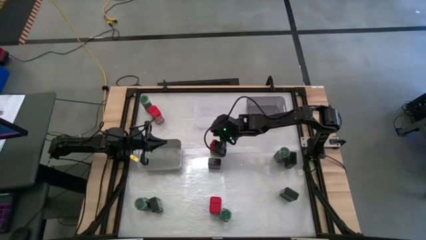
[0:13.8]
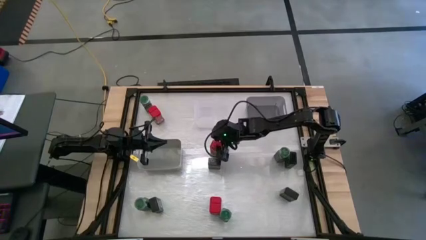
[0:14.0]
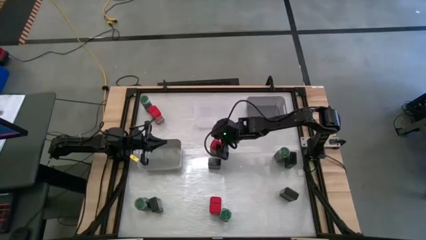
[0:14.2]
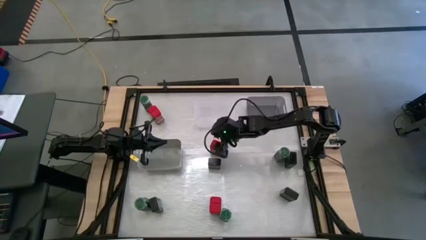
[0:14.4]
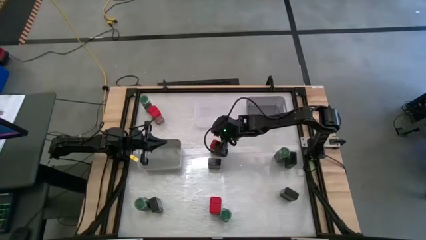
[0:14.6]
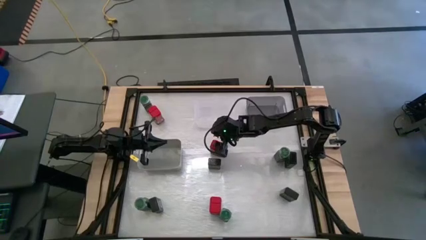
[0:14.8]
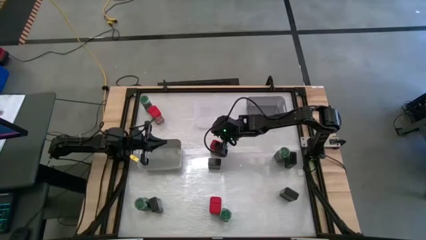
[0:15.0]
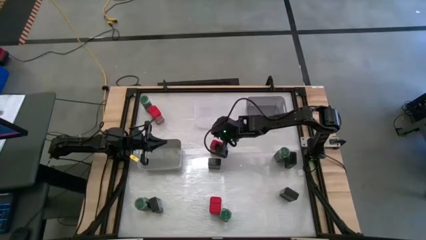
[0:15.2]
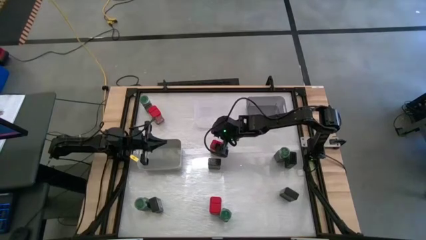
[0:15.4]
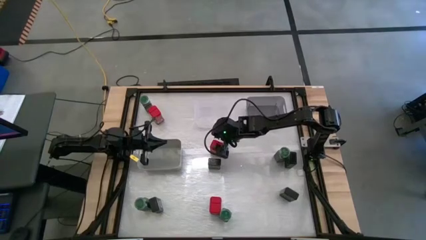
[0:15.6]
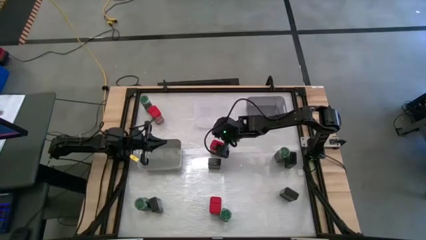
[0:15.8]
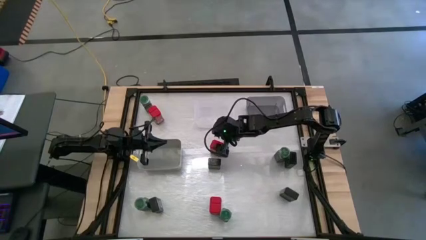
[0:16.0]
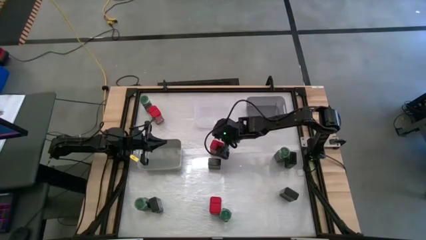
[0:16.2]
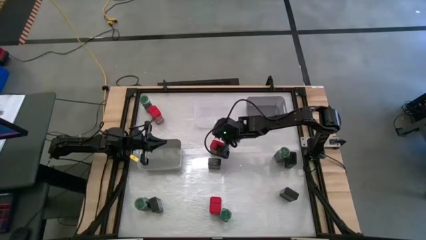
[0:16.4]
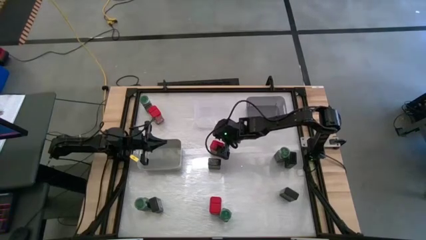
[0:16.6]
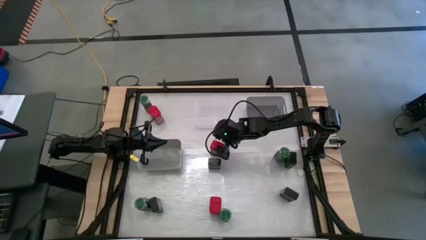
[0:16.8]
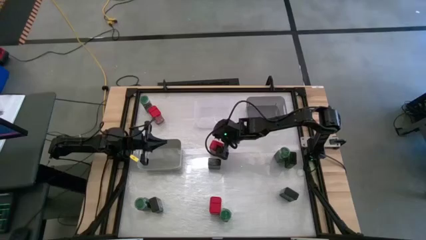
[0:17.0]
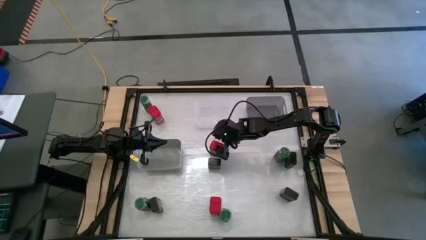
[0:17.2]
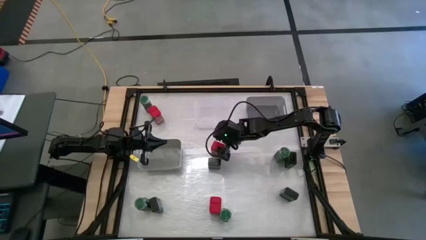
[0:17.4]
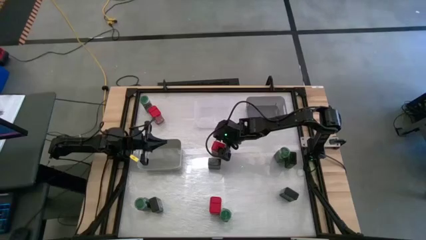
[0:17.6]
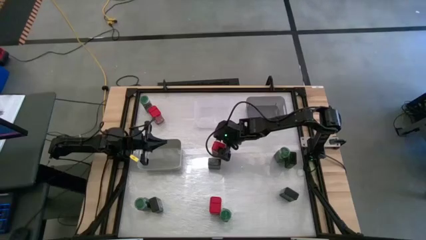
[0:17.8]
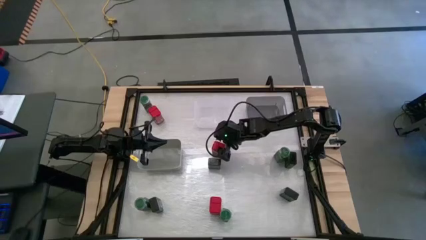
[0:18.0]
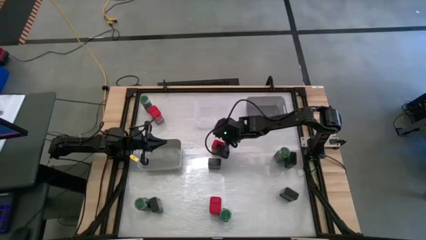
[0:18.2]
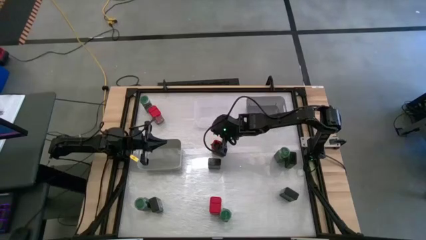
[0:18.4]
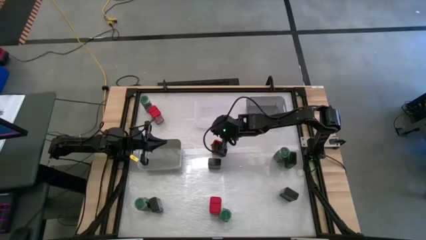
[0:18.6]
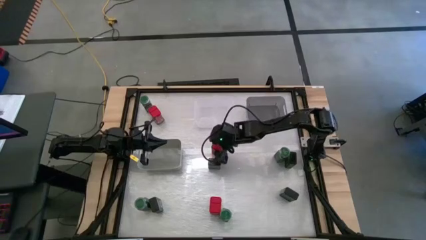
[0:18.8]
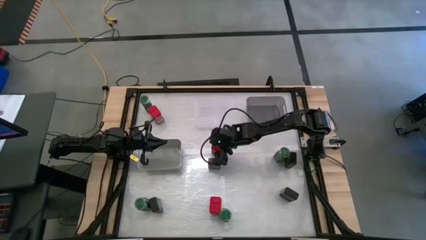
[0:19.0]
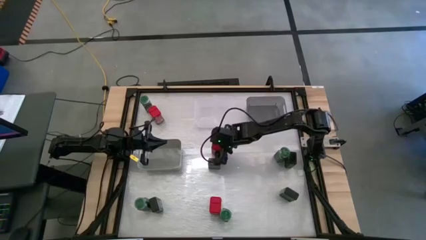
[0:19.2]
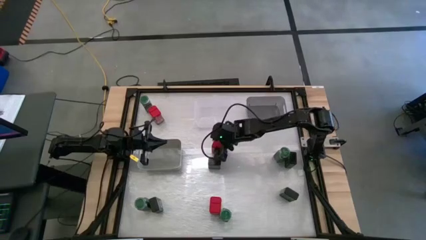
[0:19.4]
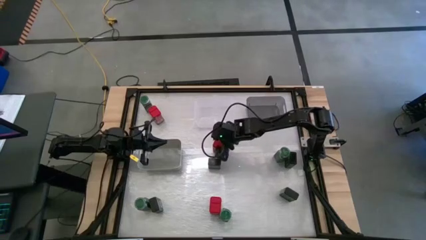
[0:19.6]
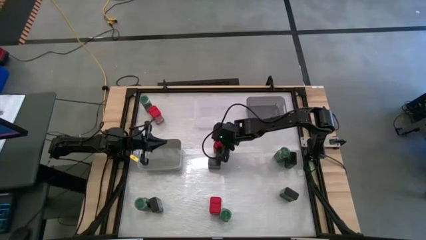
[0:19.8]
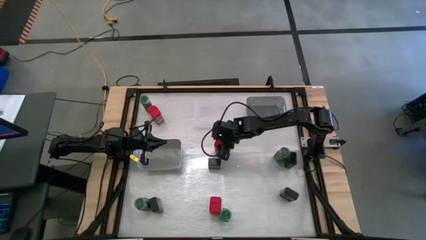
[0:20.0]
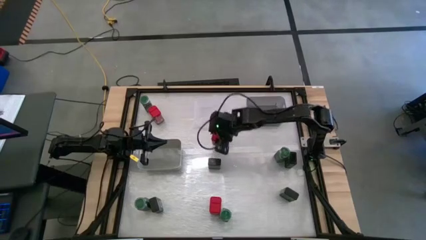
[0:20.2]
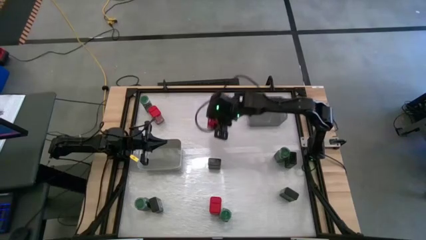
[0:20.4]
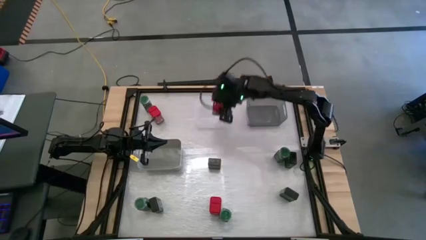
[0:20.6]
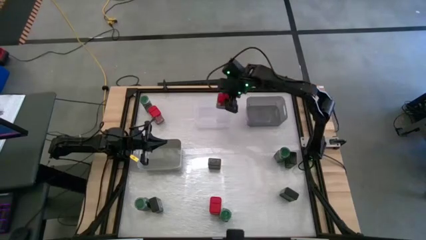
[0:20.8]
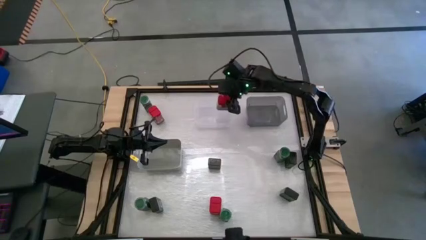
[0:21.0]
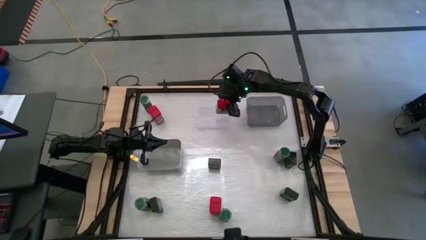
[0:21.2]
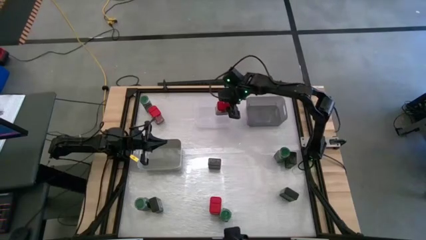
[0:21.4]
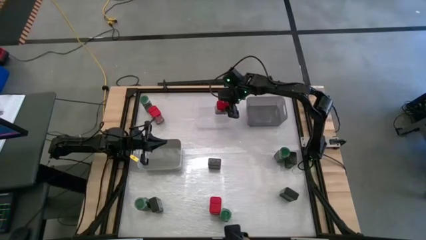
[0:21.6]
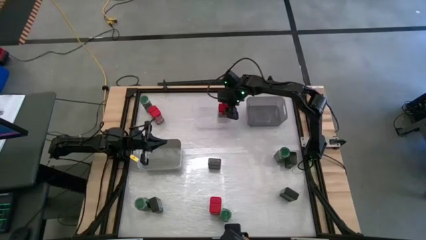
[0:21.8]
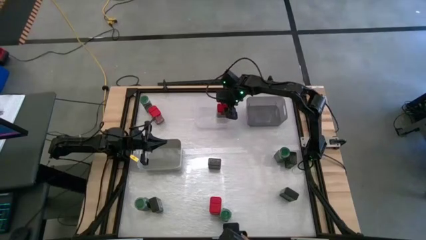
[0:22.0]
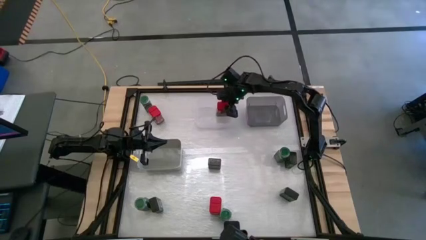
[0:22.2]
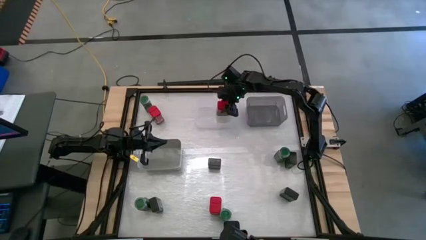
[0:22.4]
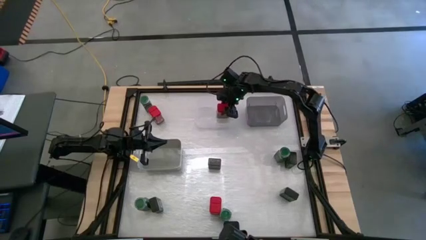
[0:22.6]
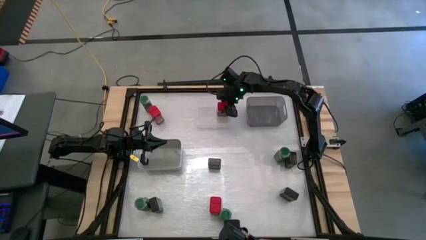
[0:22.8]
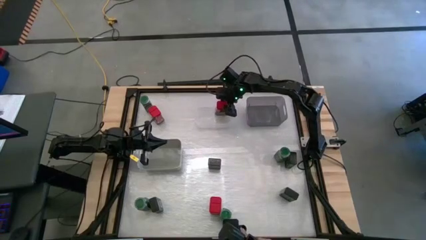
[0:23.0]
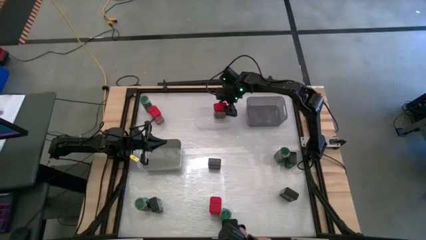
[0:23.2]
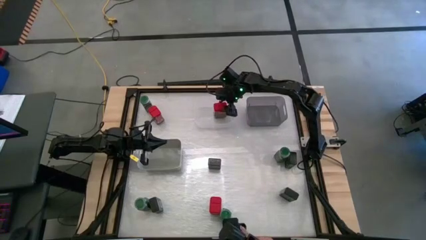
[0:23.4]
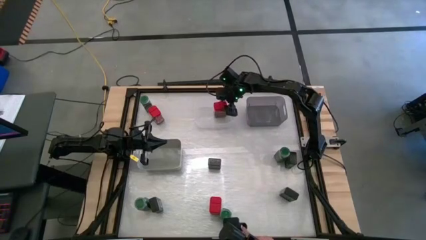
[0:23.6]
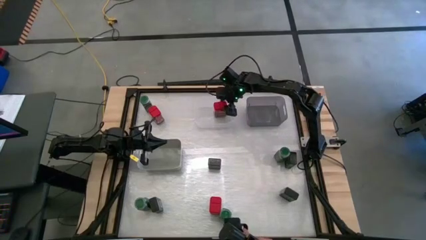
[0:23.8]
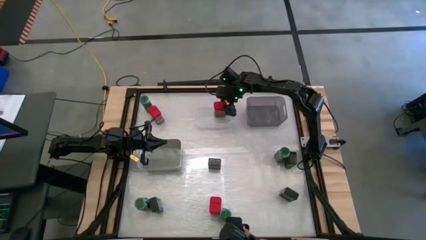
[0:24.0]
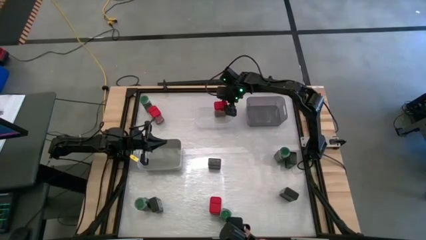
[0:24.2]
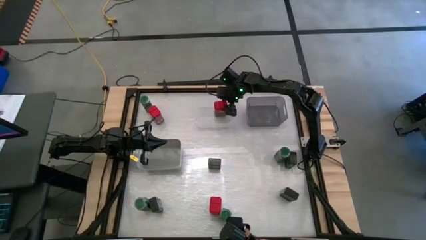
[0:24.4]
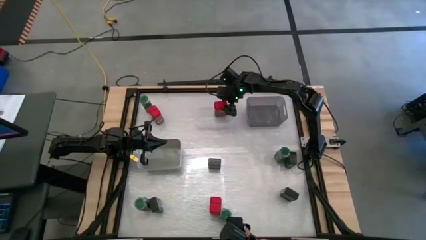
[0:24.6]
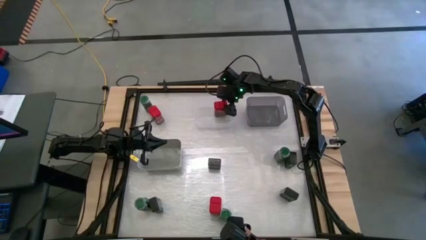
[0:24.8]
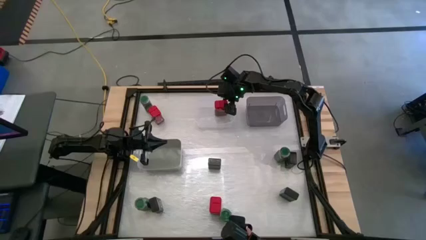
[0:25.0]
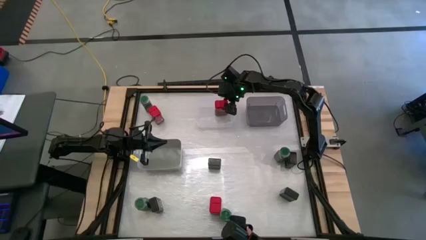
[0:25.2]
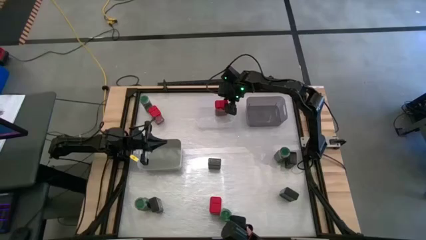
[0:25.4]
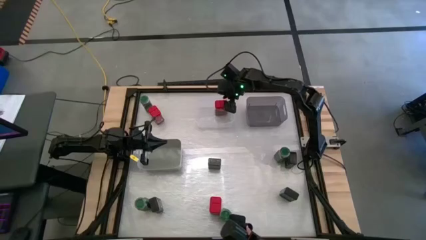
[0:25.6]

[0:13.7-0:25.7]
Task: Sort spices by type
Put the red seasoning can into the transparent bin
